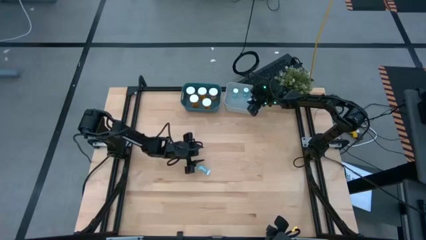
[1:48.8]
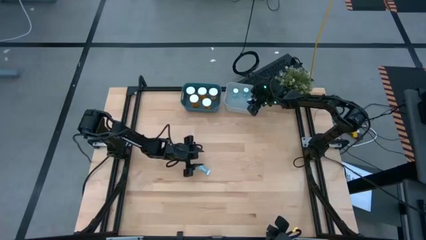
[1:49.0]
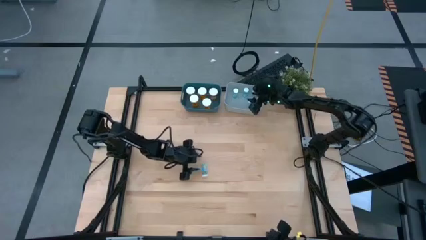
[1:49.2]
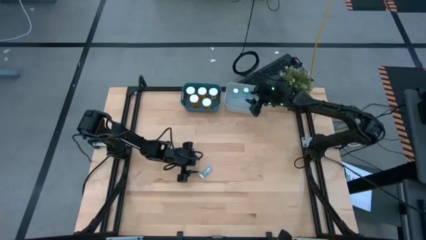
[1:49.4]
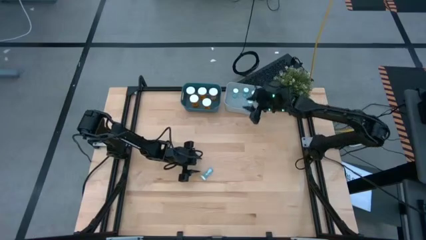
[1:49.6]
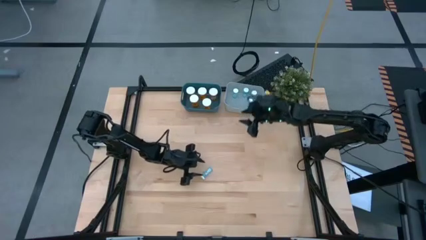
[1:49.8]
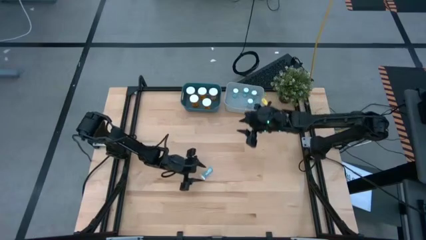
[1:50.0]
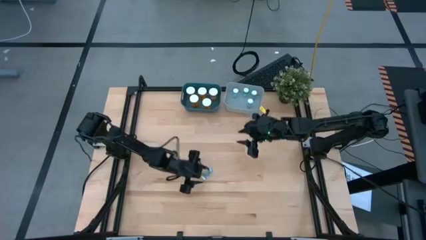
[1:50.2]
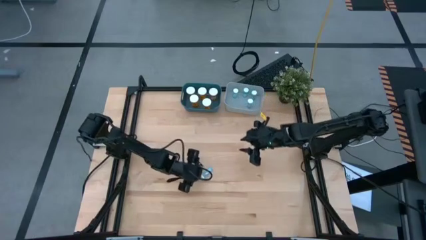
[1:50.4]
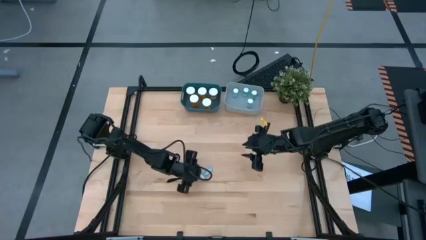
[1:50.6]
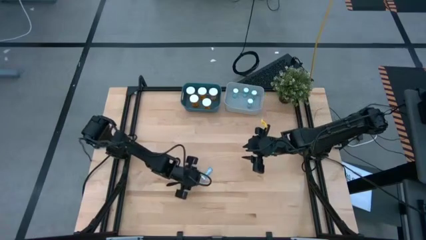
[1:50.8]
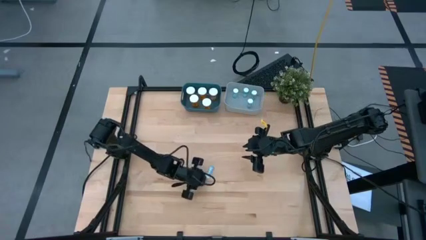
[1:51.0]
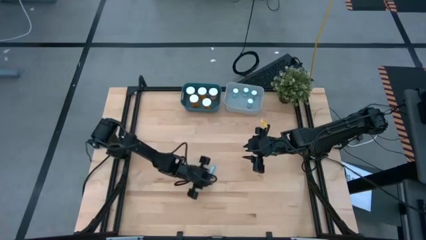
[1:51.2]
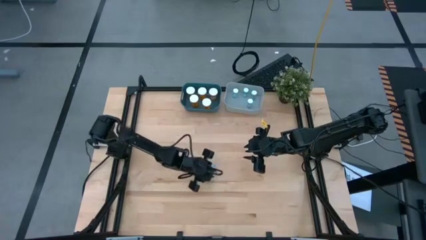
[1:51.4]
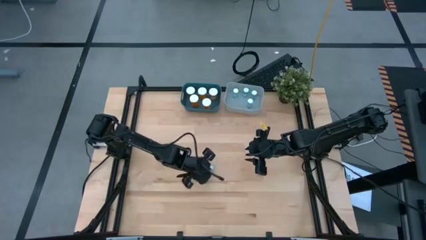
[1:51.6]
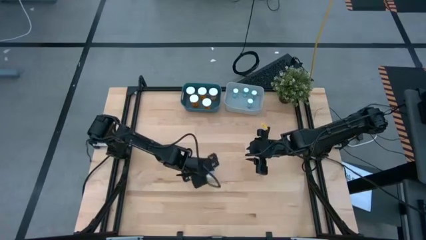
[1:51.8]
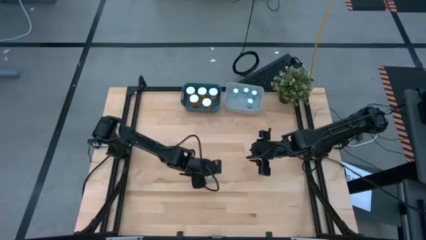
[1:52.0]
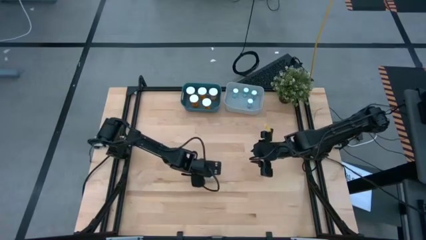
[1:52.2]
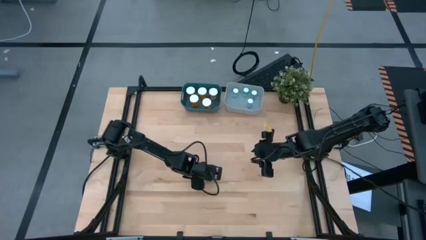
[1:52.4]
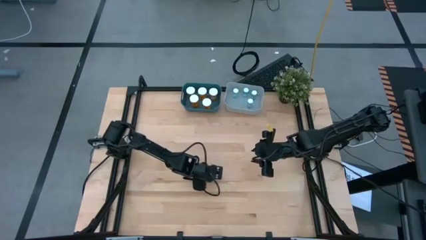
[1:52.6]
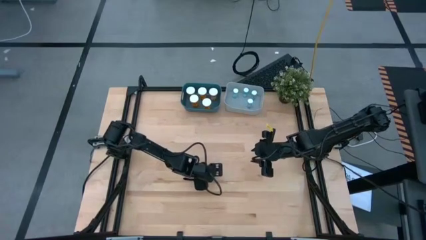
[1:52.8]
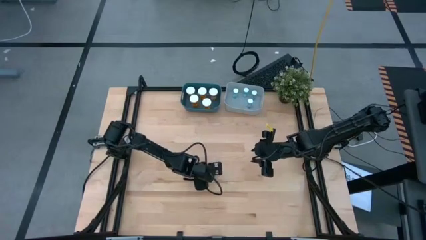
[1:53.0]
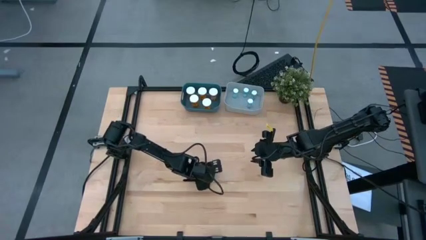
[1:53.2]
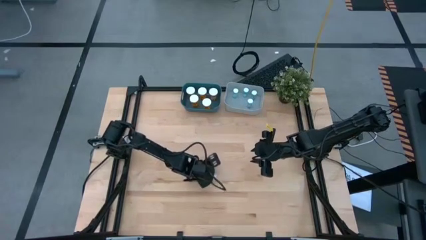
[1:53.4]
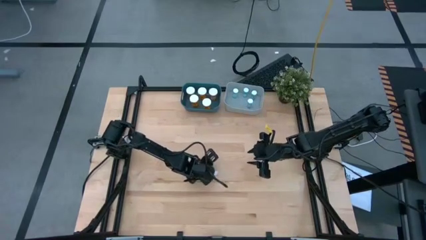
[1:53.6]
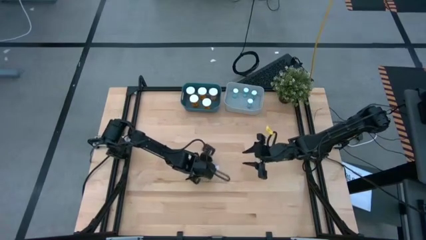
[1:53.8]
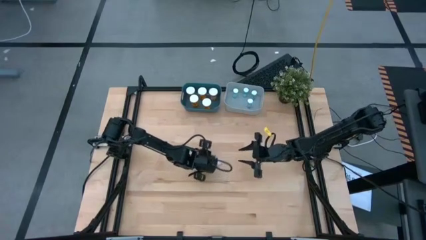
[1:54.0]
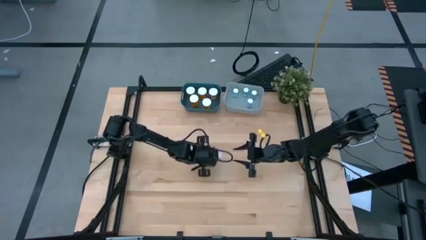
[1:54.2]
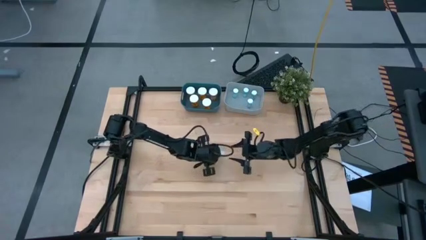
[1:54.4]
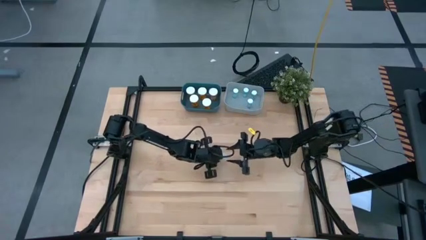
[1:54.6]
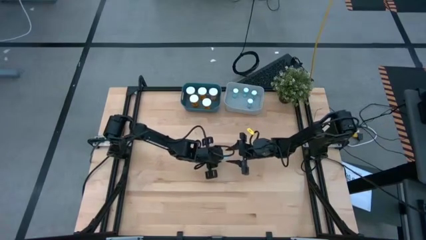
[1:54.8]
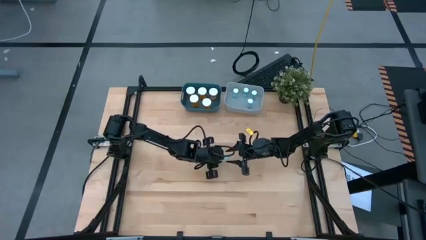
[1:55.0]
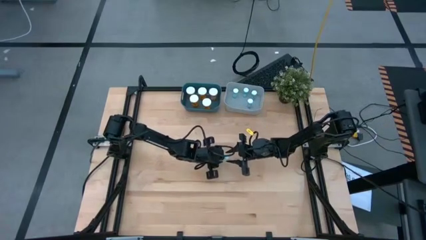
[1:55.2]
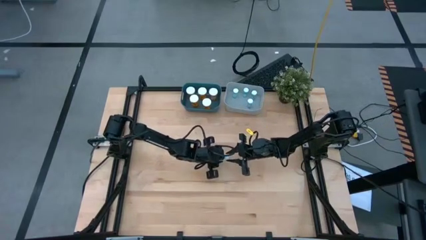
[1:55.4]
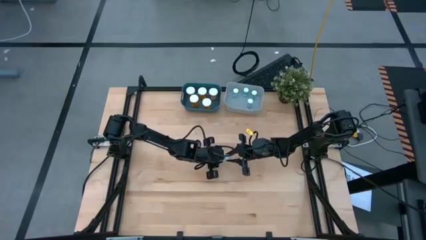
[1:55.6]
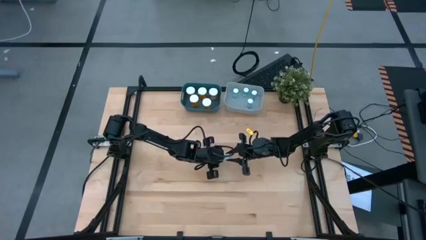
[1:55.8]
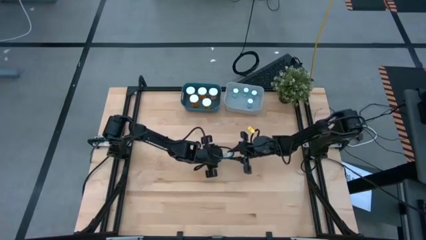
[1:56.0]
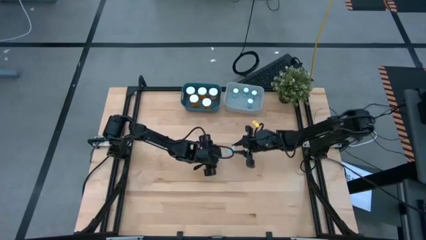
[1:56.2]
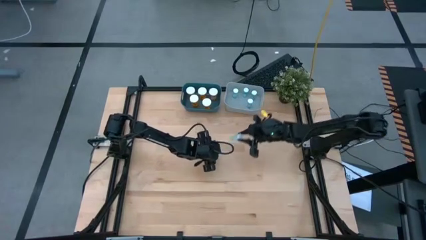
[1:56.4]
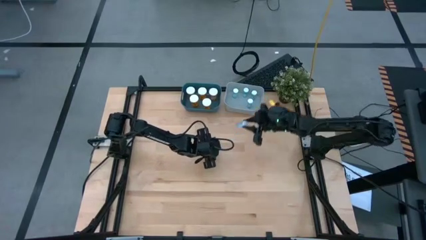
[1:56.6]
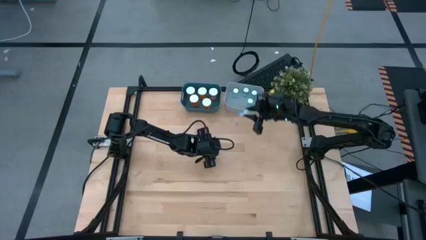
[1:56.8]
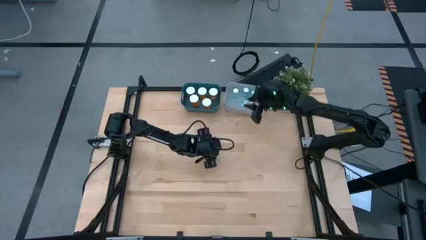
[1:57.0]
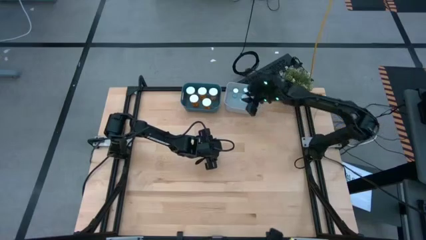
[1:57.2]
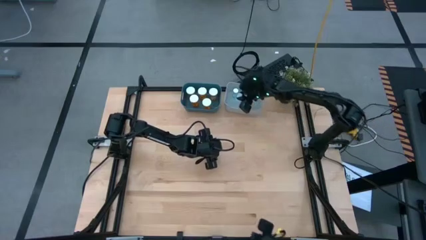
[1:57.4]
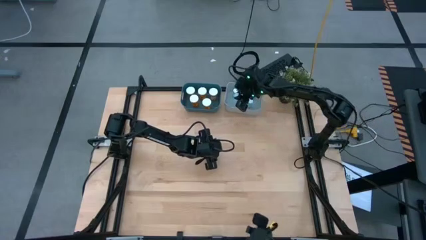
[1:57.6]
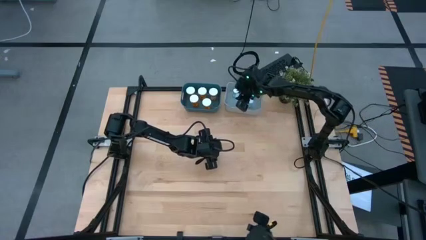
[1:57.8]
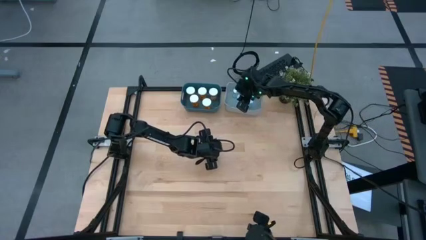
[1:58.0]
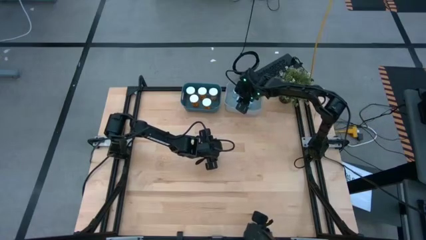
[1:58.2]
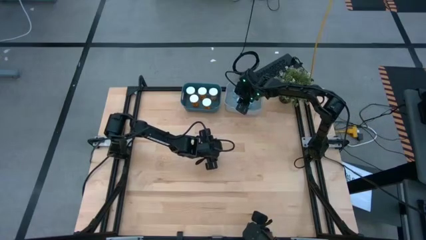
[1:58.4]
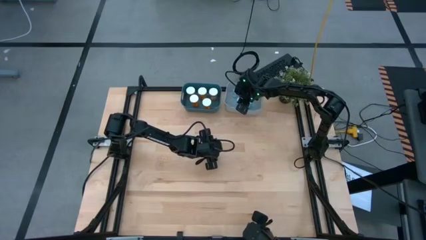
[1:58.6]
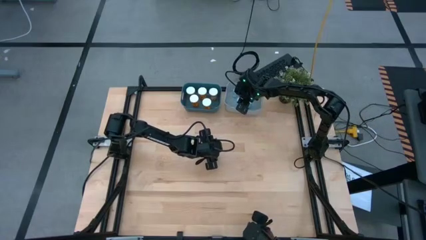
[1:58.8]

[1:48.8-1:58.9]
Task: Pick and place medicine bottles into bin by pill shape (circle, oval)
Put the blue pill bottle into the gray bin
